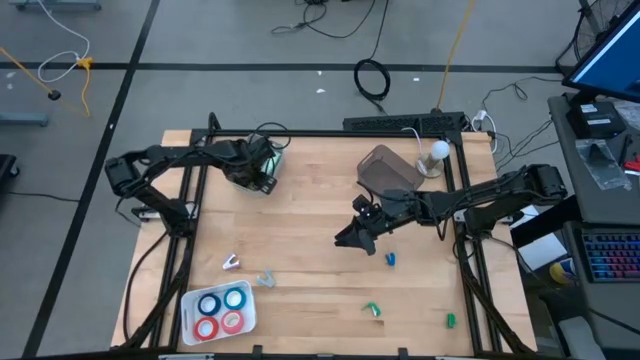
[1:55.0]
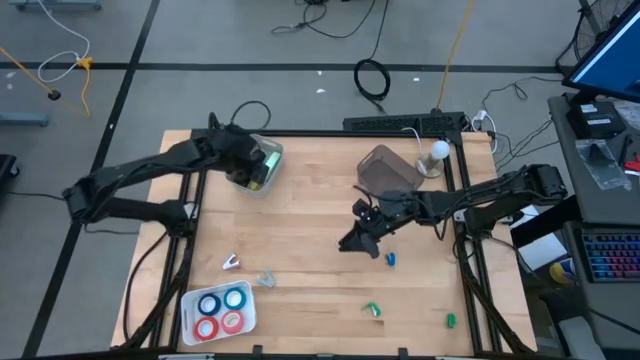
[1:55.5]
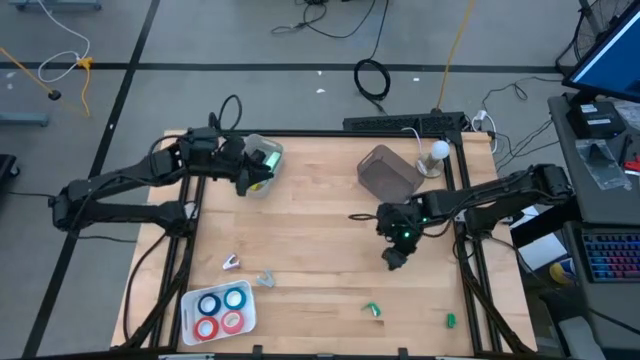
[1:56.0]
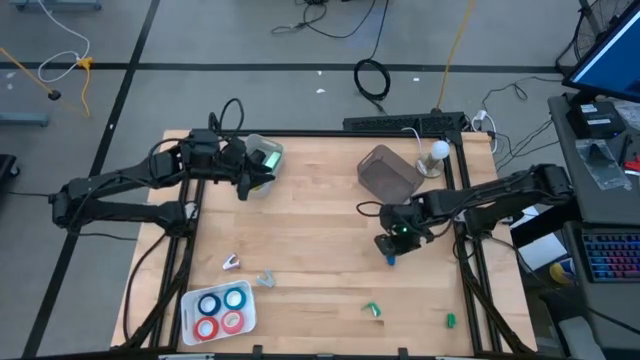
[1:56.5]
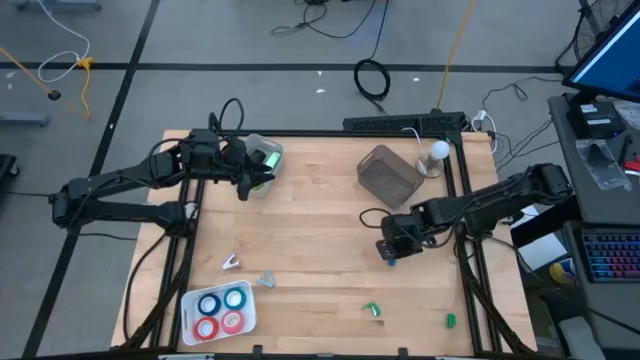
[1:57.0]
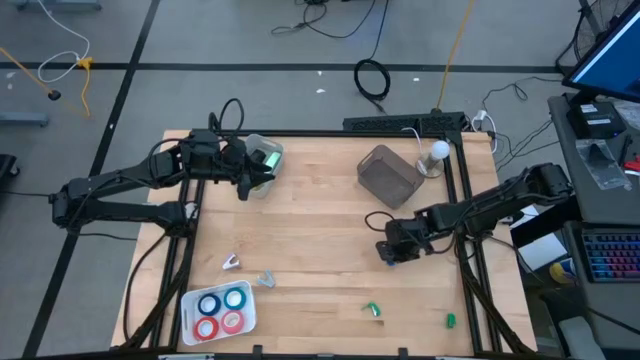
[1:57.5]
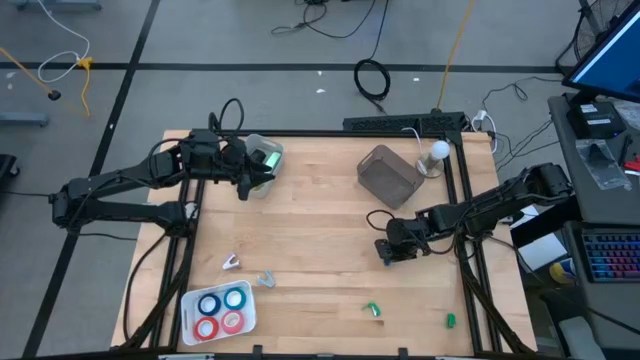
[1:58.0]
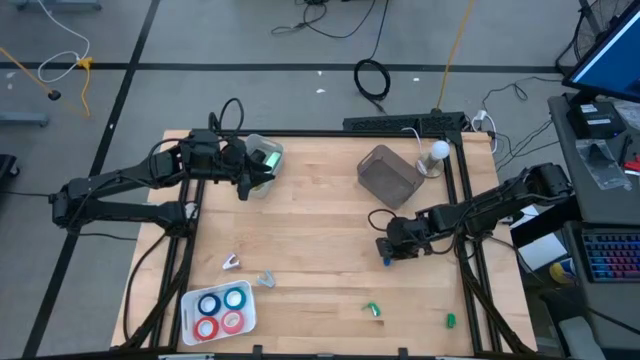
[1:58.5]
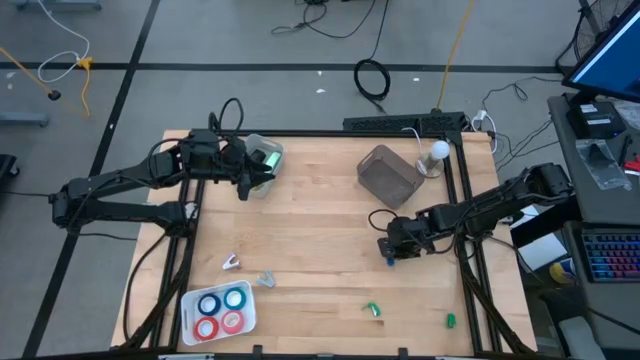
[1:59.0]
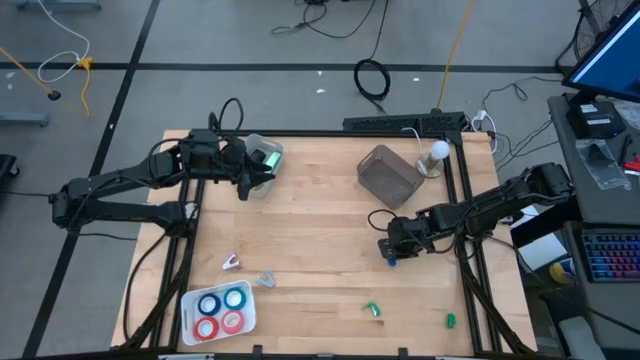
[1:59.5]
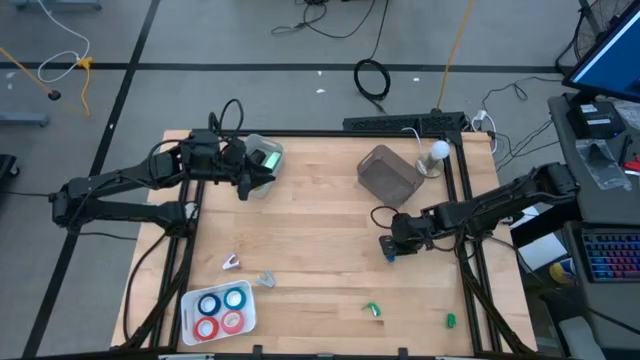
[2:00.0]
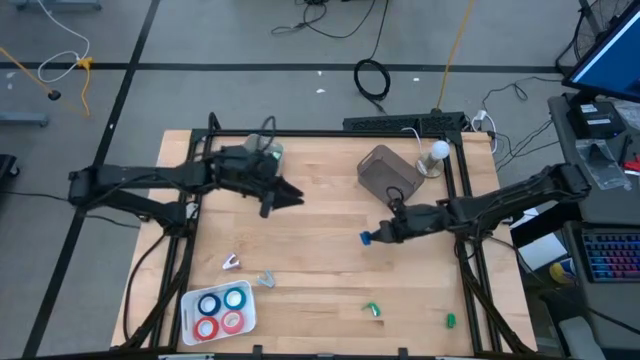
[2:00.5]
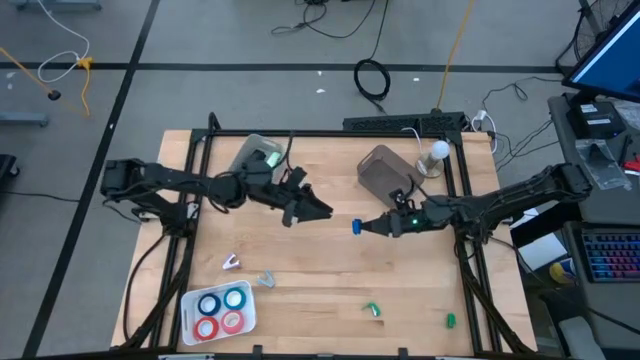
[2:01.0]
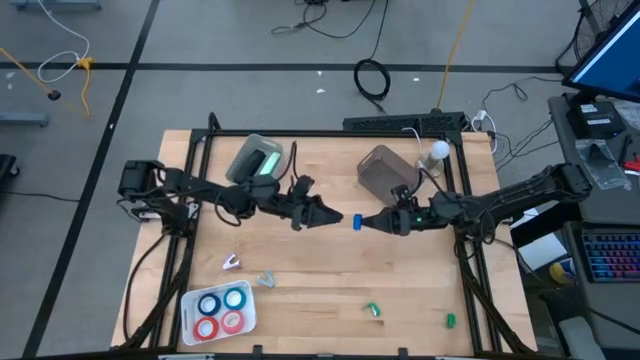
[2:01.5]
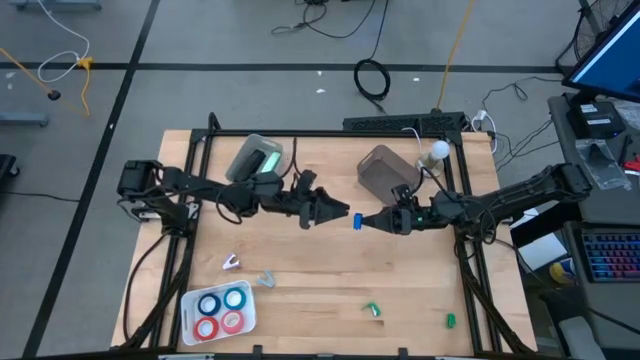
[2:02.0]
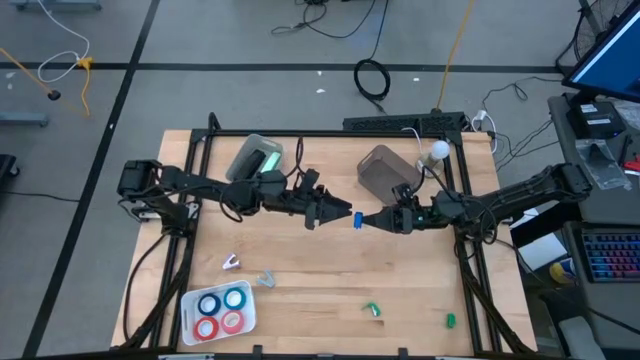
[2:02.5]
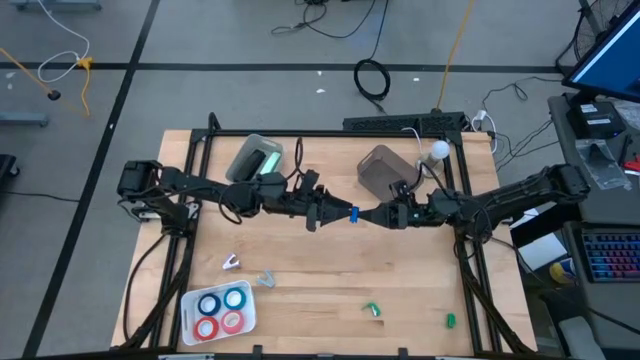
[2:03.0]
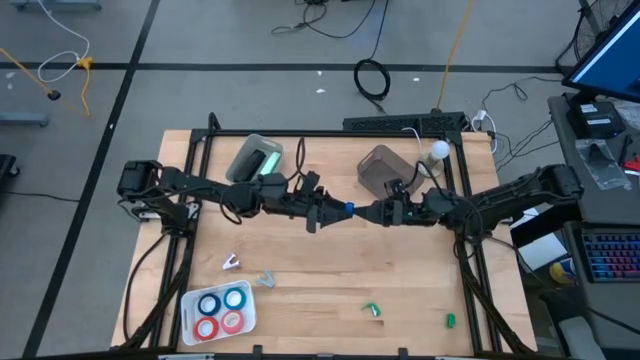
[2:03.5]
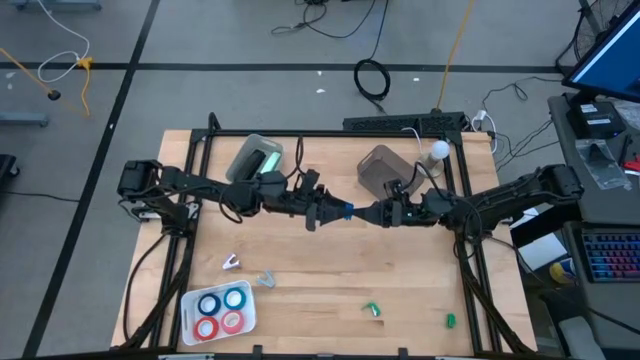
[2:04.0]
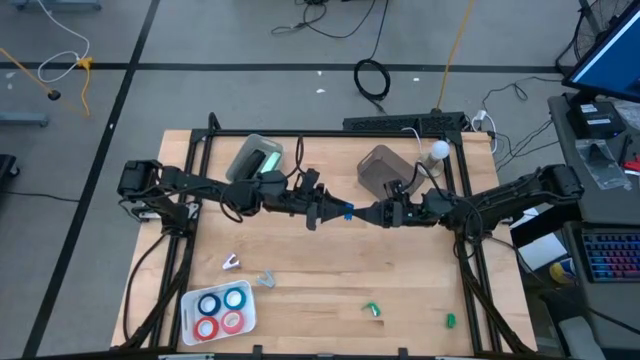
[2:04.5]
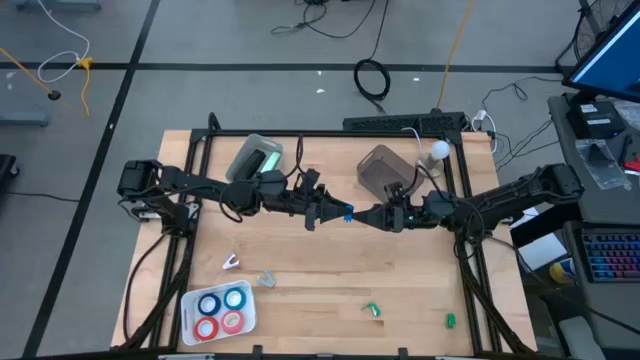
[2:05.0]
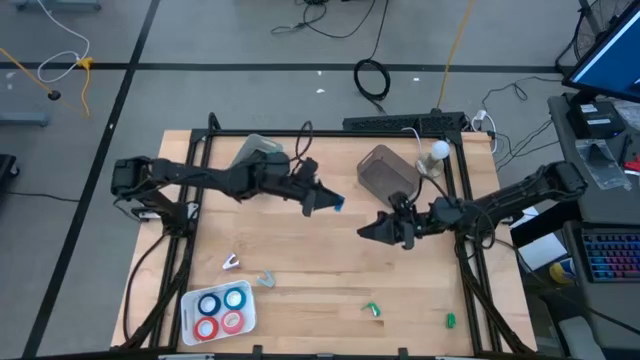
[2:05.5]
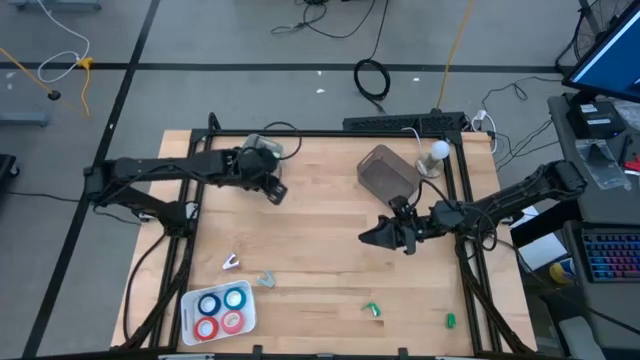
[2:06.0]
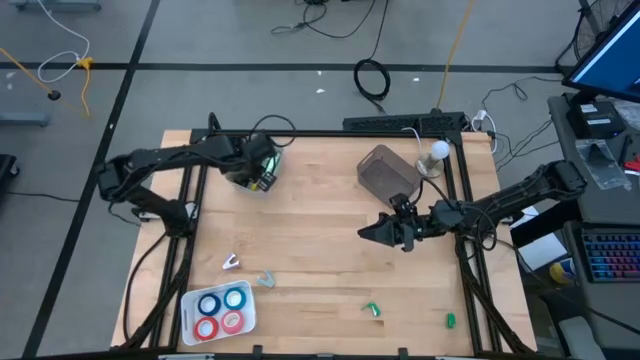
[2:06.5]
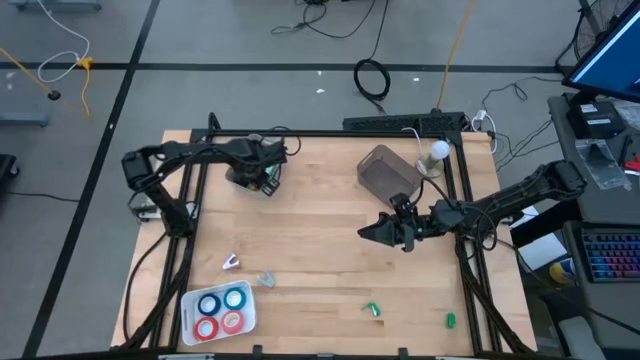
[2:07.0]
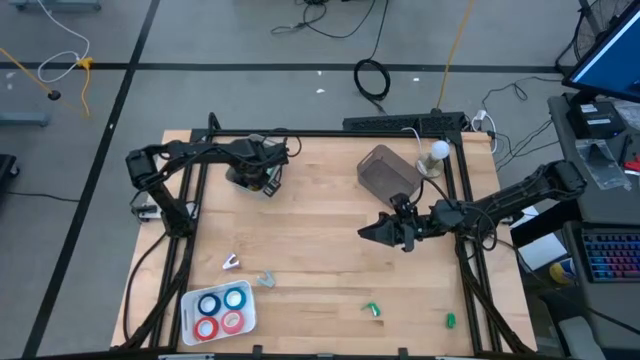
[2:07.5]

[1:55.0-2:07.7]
Task: Pick and place Stapler, Stapler remover, tape
Put the blue stapler into the gray bin

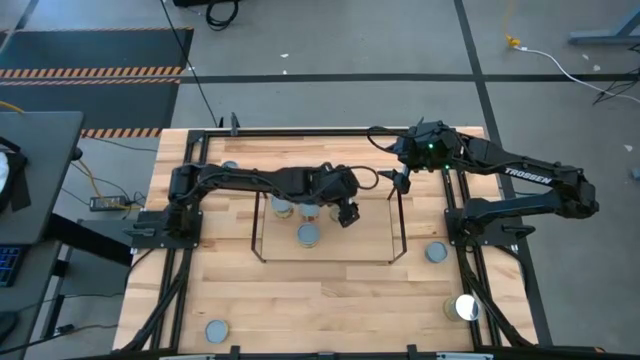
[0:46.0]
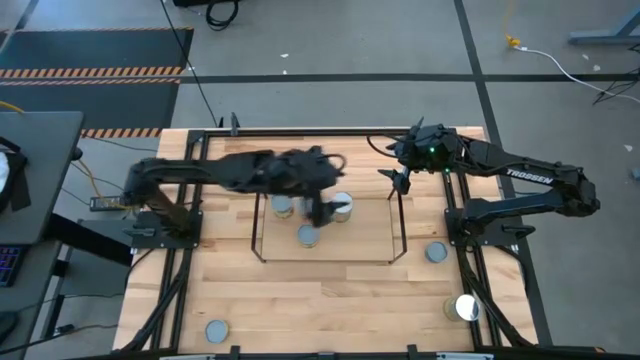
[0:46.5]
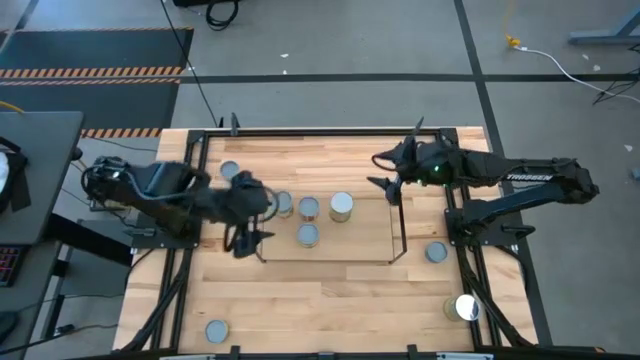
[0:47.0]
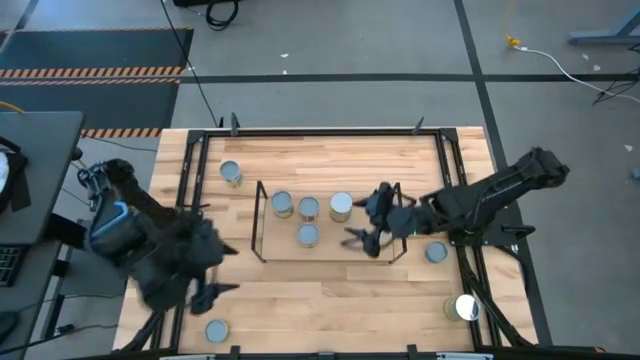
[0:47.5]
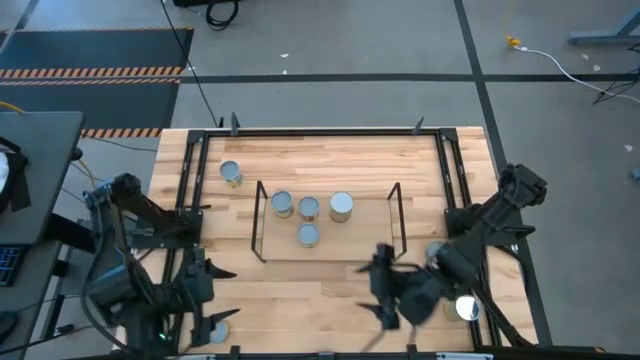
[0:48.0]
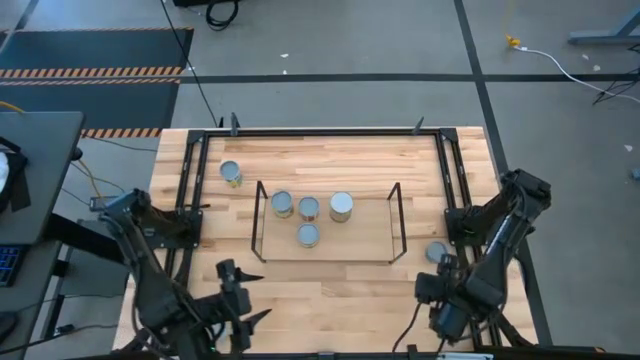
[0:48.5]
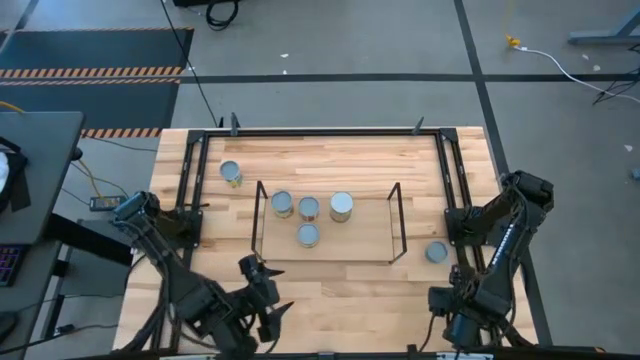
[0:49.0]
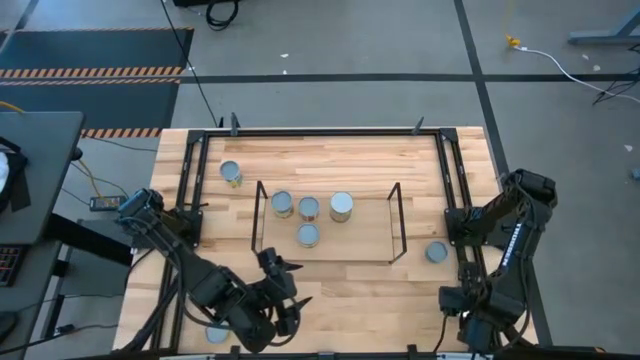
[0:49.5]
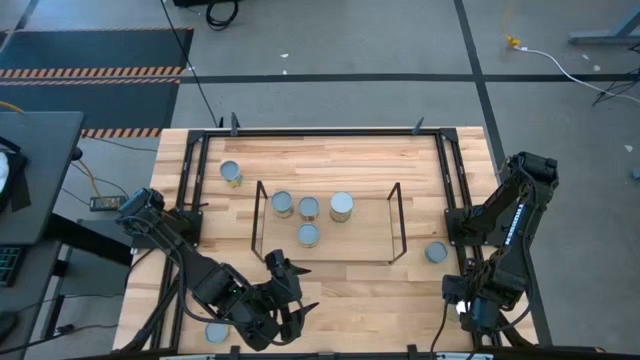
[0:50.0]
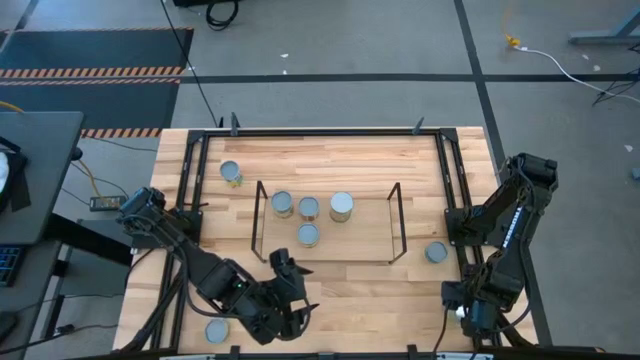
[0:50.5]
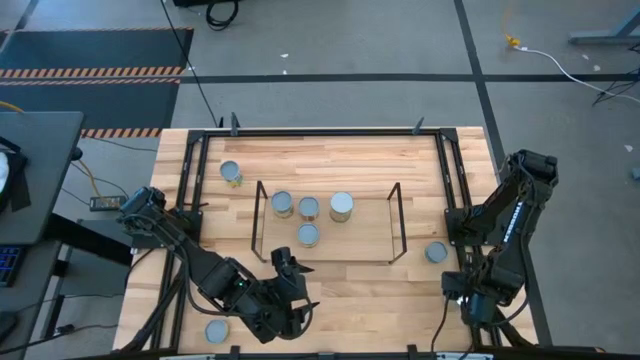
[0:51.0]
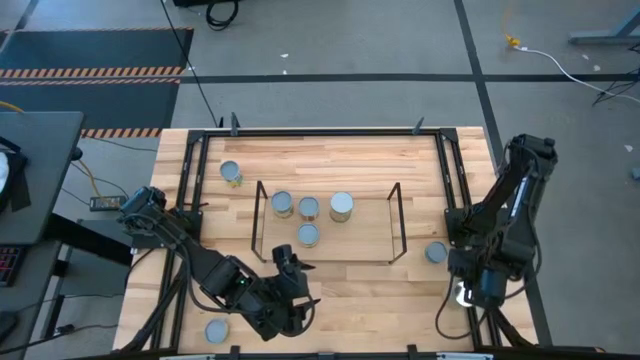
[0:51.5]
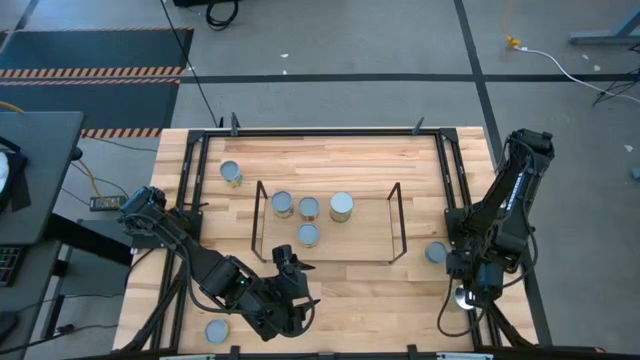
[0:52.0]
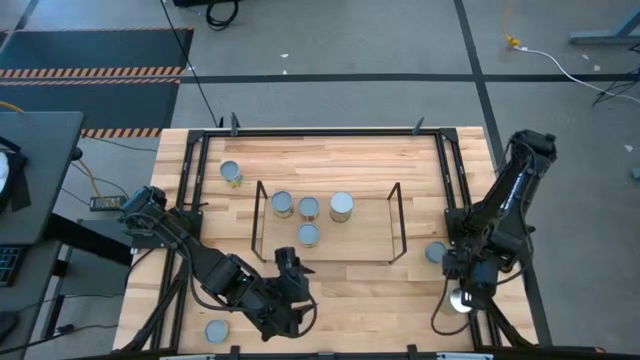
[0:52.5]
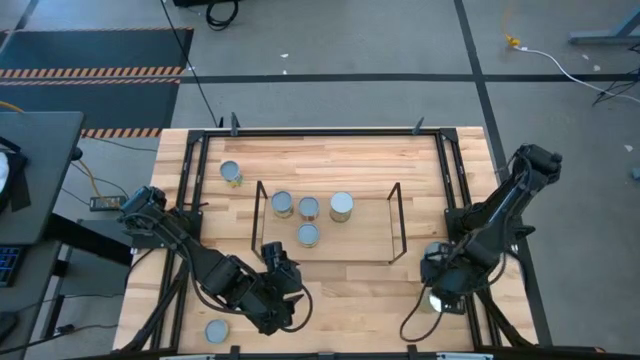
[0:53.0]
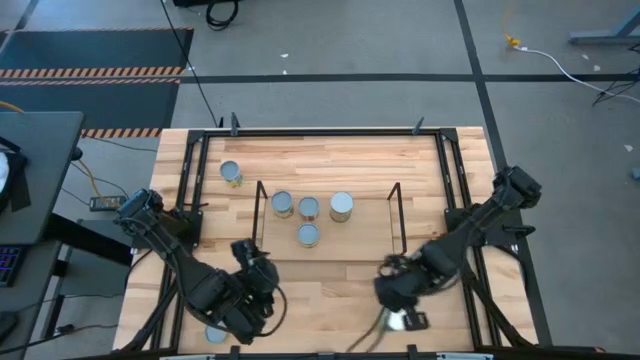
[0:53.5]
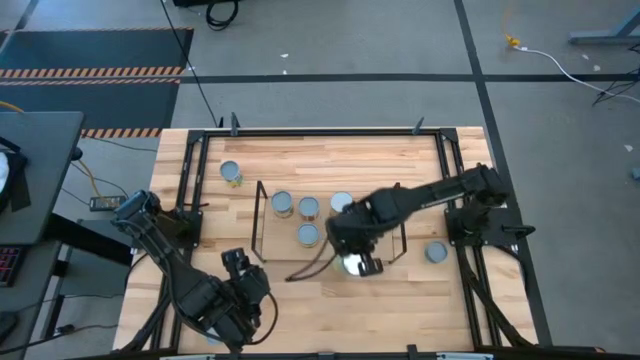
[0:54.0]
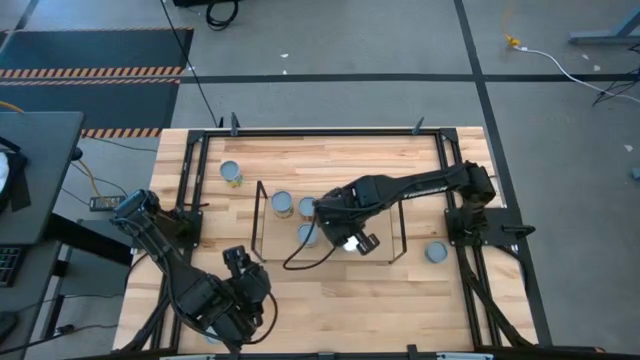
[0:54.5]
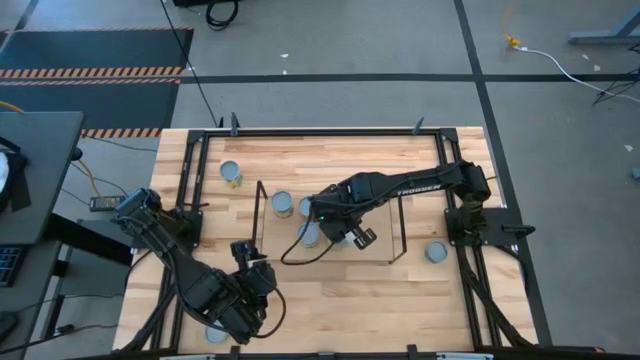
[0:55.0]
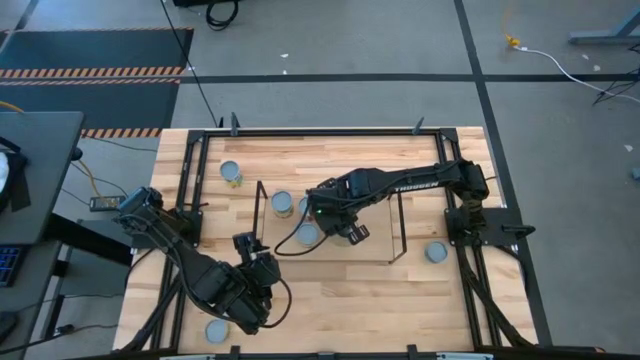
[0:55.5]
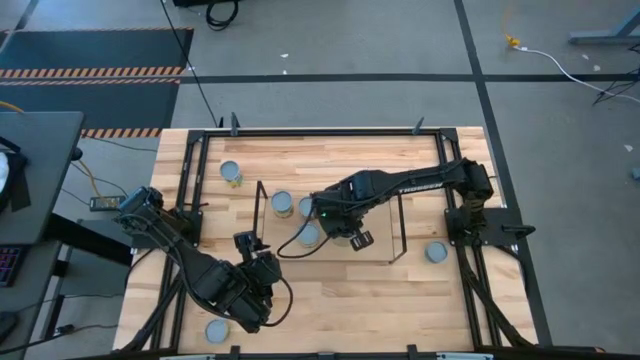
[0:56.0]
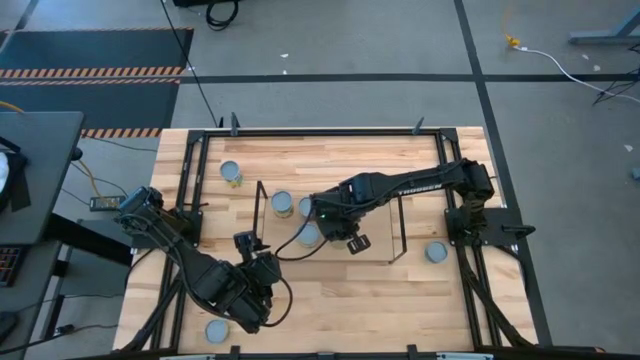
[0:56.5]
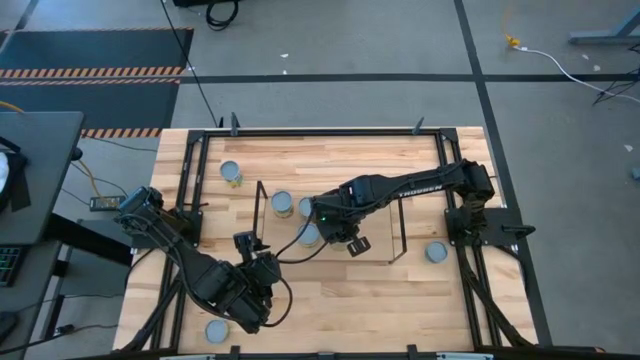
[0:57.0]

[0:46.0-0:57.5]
Task: Pick and place cans onto a shelf
Put the blue can on the shelf
